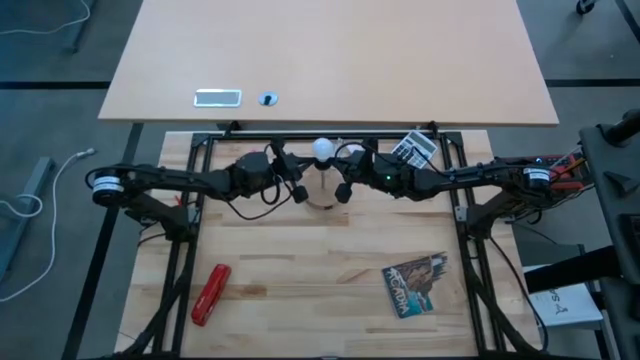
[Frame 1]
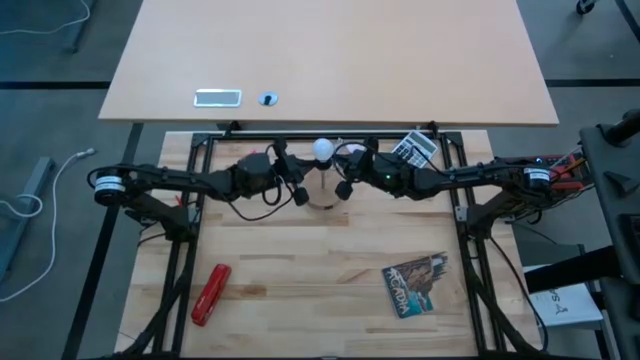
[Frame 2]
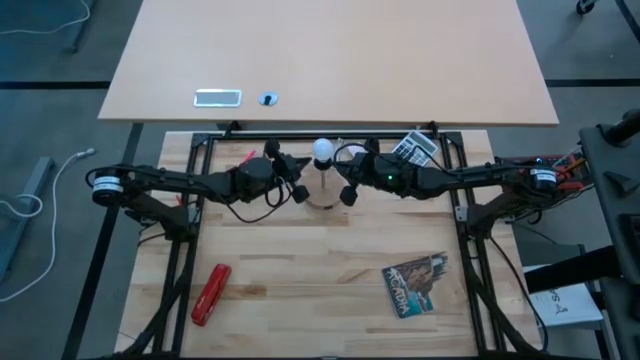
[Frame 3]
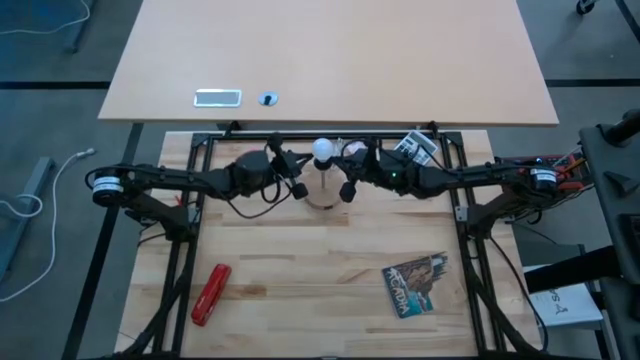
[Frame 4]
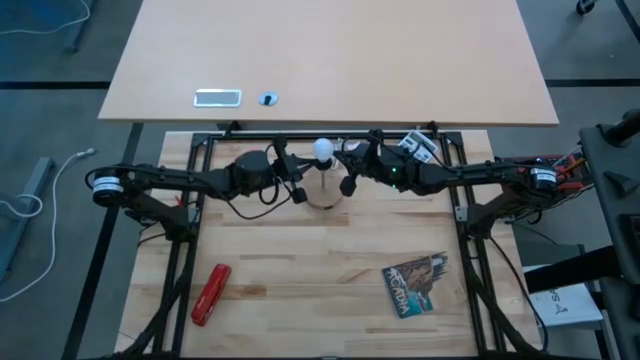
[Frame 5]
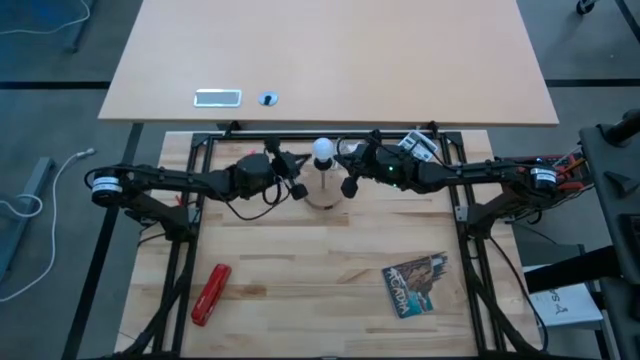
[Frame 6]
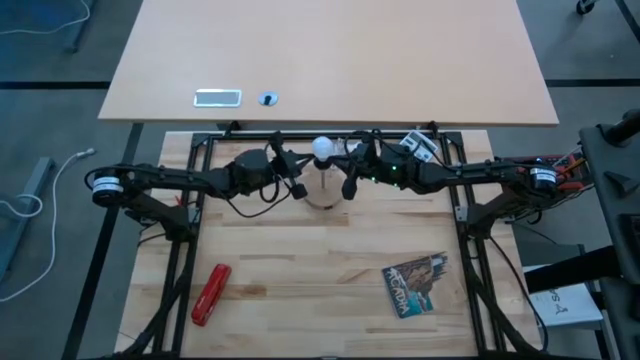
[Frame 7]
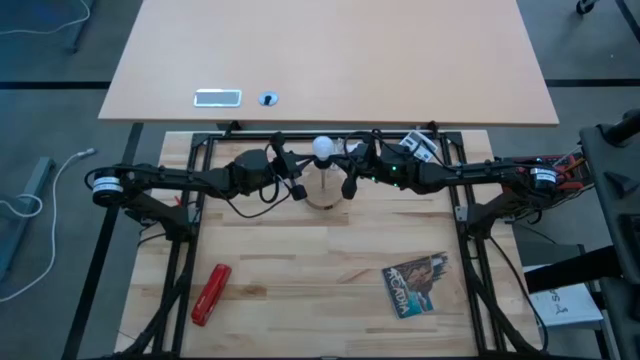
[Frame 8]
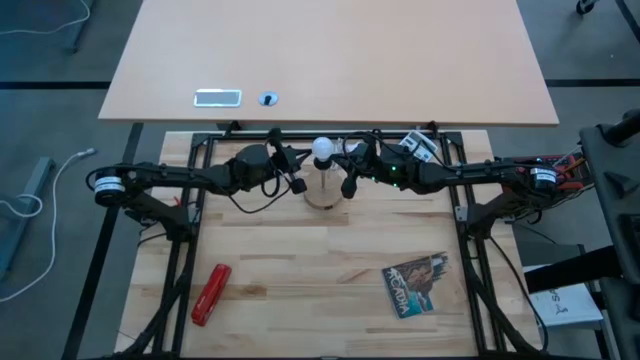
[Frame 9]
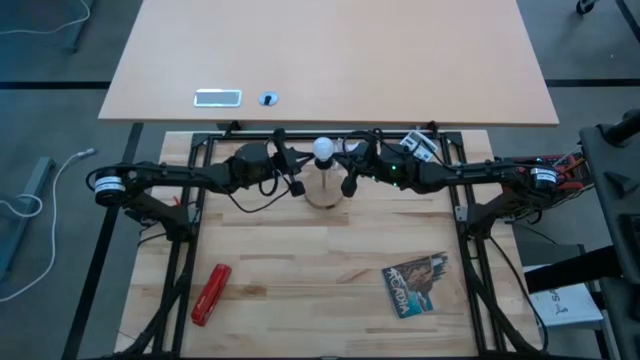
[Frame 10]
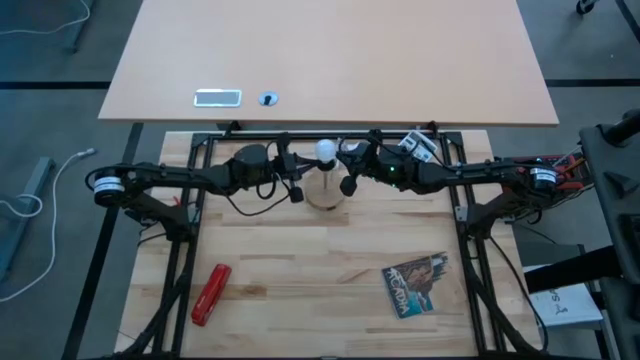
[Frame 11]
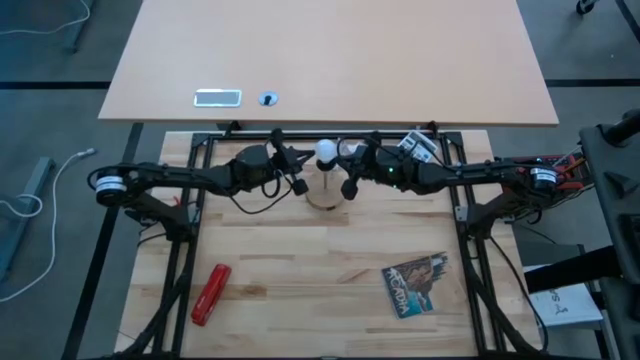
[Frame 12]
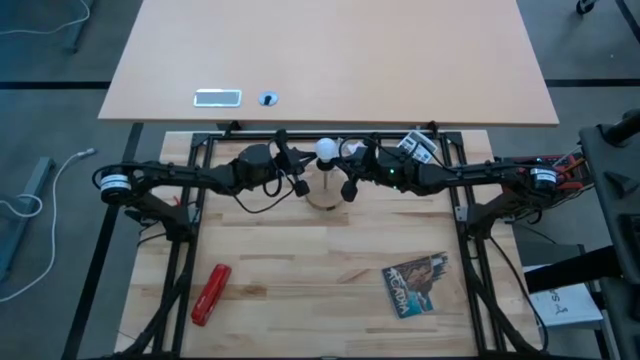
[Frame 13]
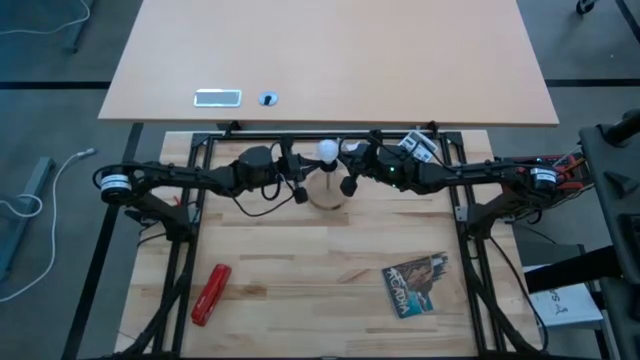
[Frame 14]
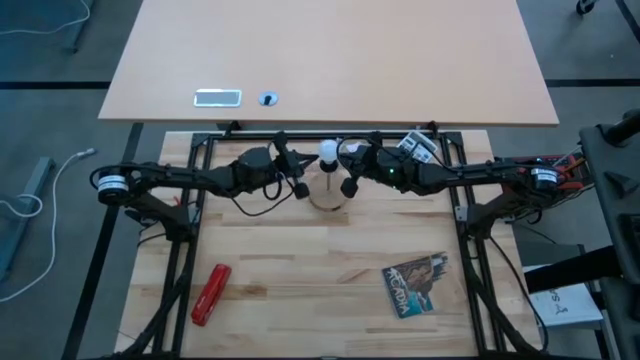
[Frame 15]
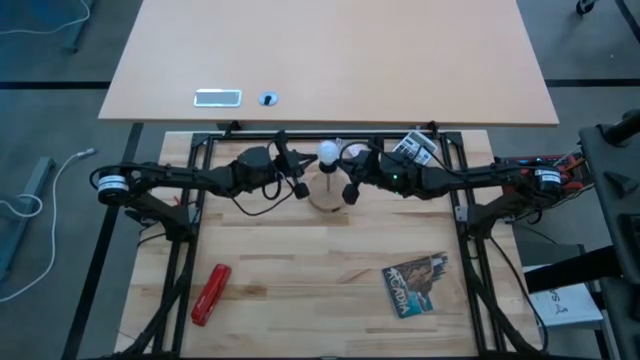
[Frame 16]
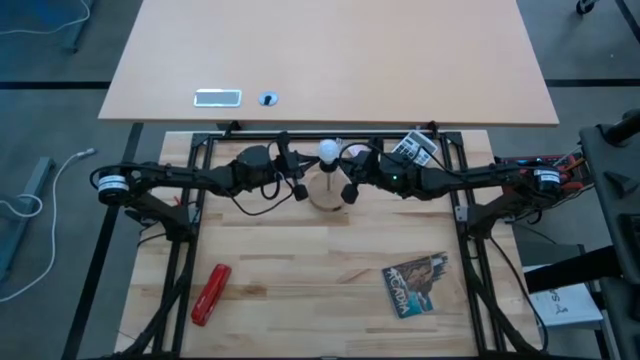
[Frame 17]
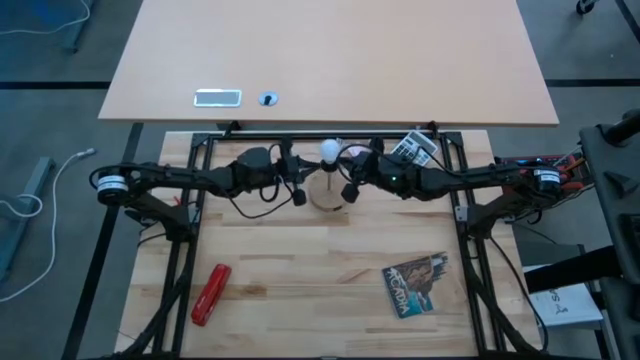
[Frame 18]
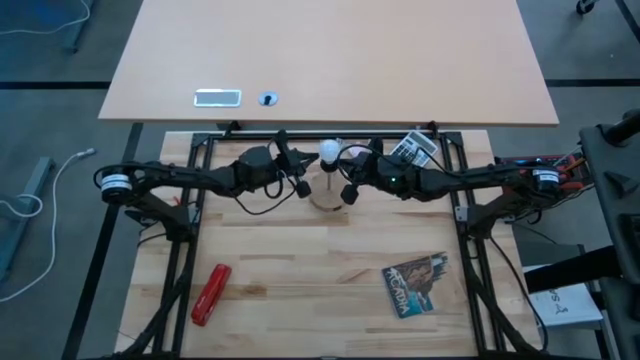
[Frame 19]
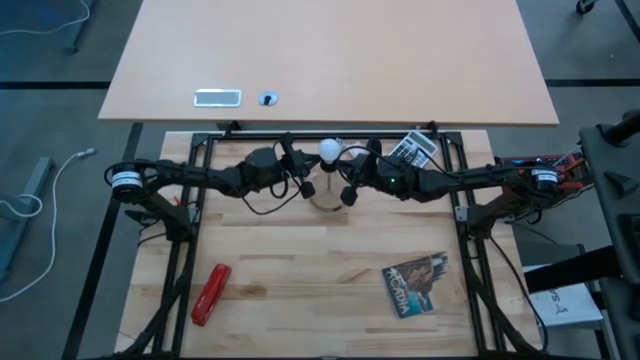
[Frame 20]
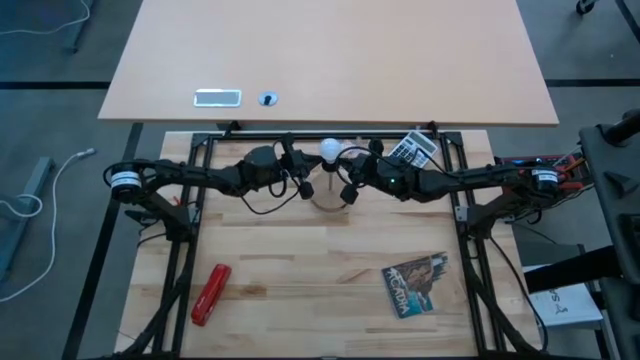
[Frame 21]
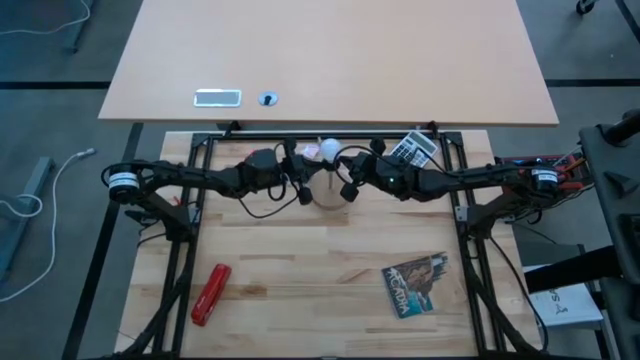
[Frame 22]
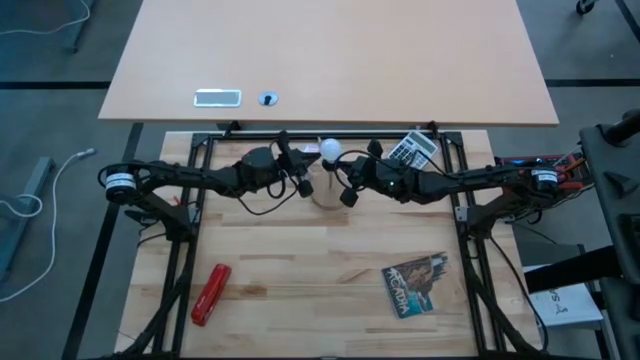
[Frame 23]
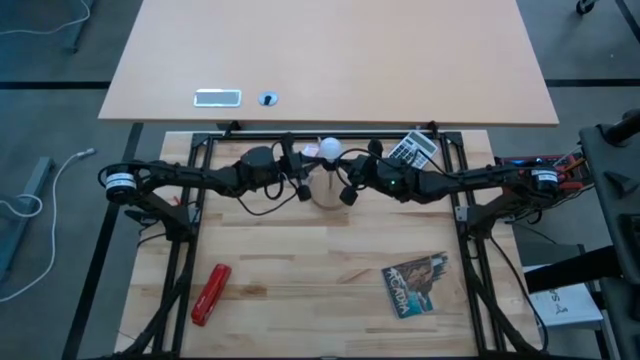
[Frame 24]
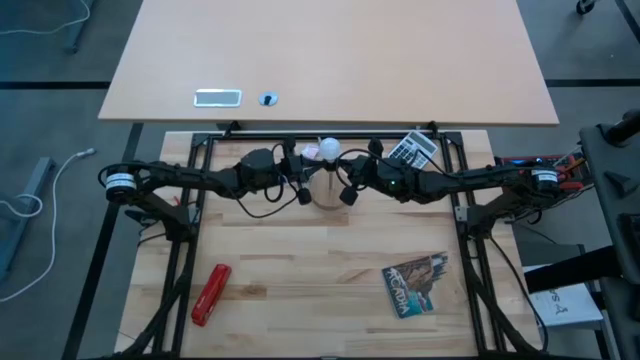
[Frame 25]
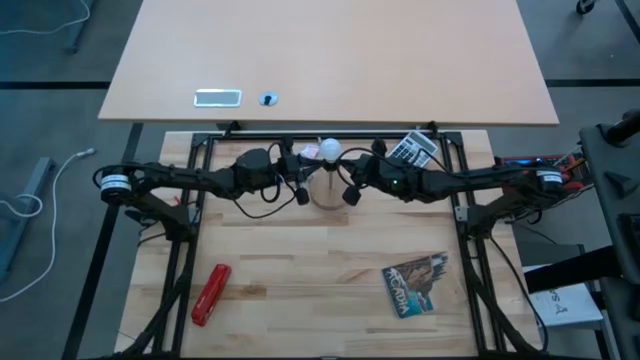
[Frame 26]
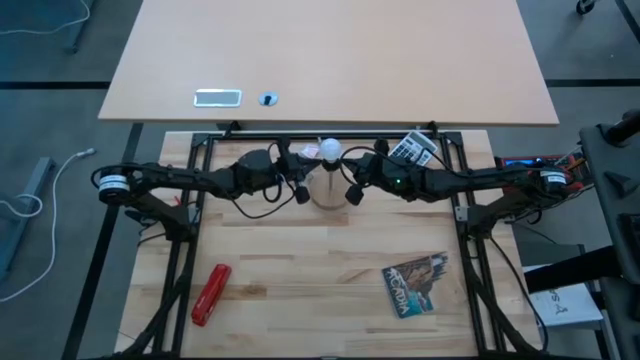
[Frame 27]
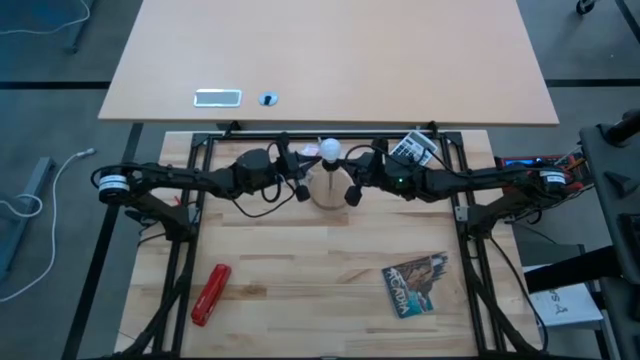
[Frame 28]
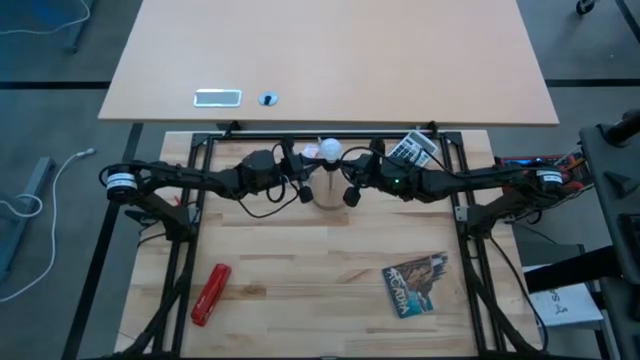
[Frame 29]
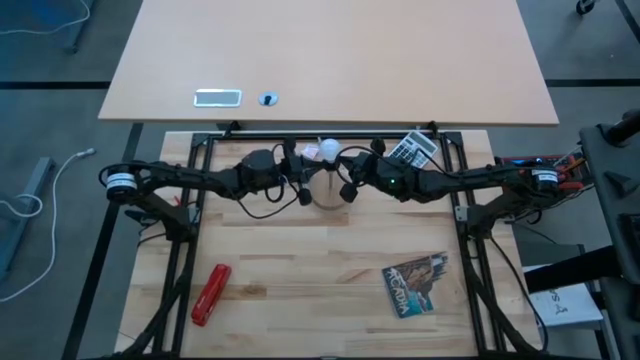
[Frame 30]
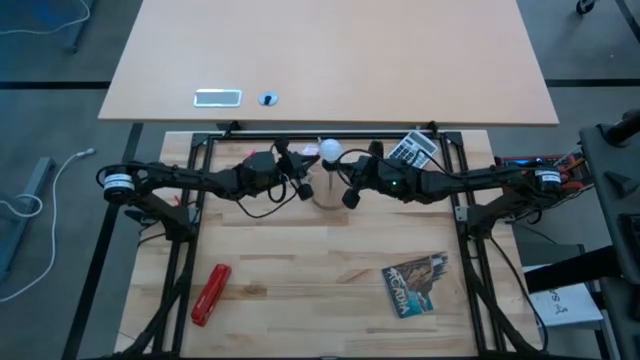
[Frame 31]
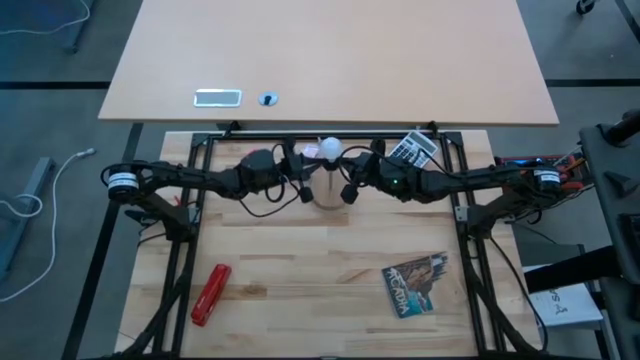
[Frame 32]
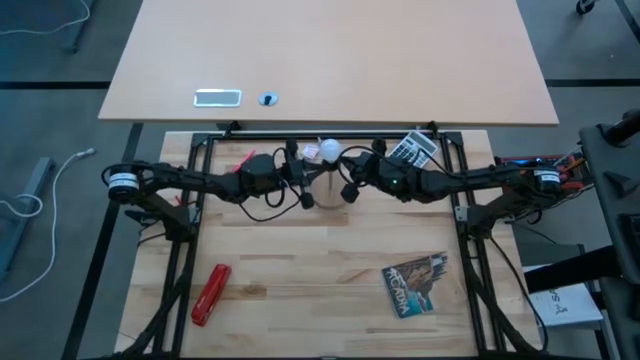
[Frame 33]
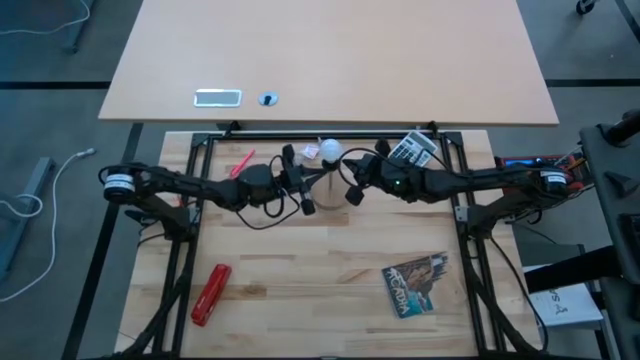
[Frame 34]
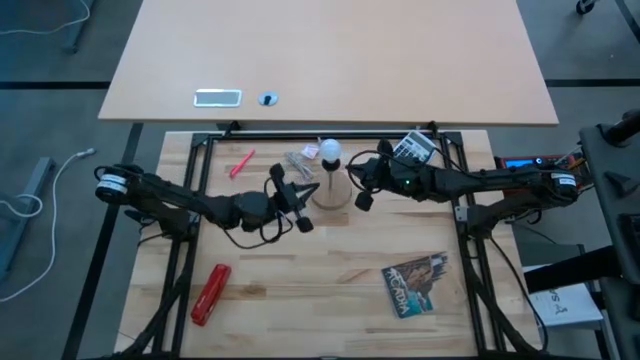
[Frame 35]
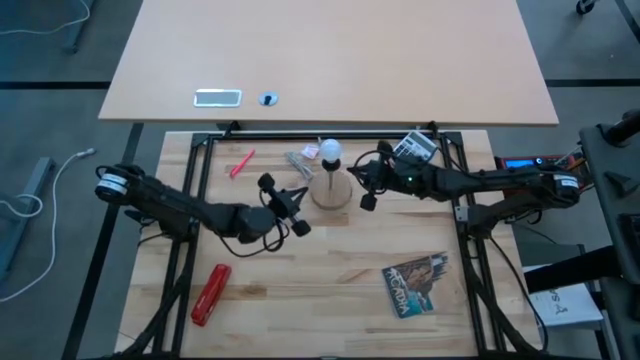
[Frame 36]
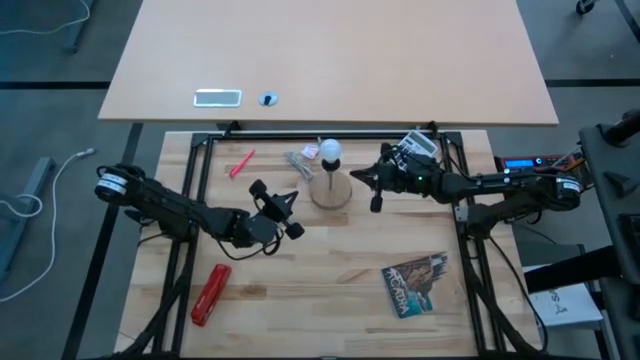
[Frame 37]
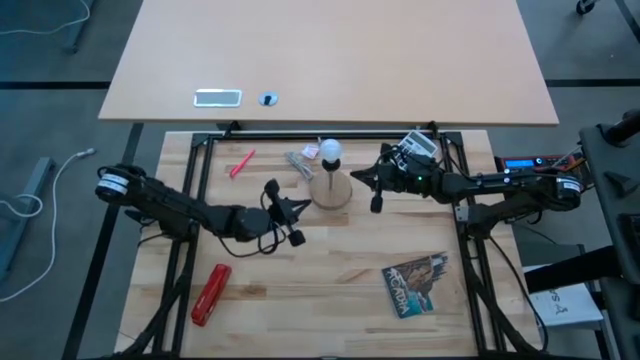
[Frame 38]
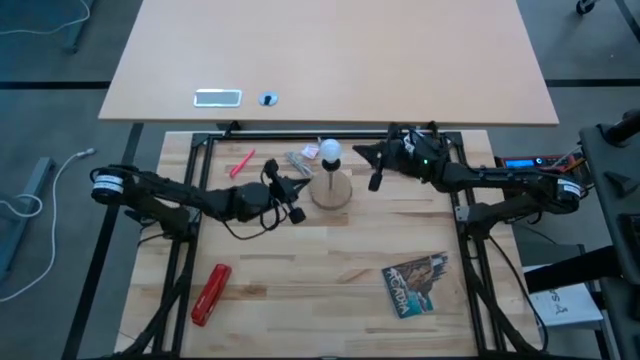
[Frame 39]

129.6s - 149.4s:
Task: Screw lightbulb
Remove the lightbulb from the lamp
